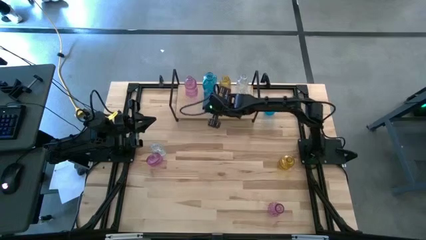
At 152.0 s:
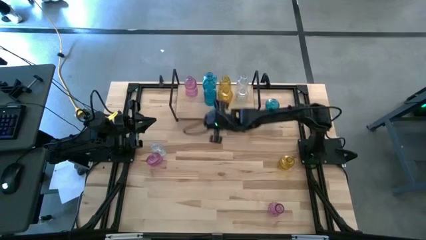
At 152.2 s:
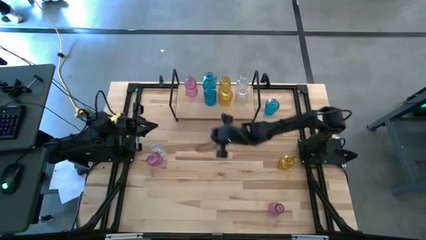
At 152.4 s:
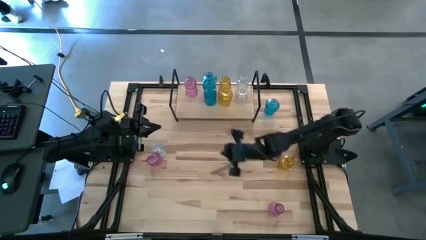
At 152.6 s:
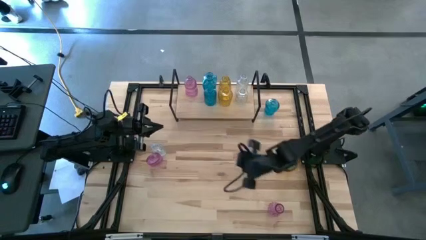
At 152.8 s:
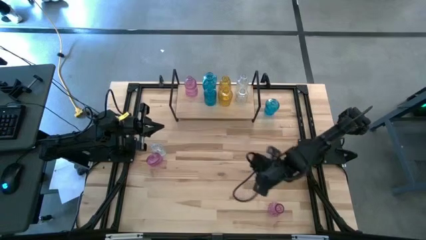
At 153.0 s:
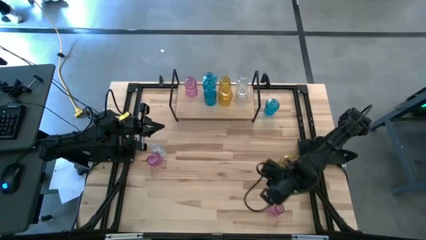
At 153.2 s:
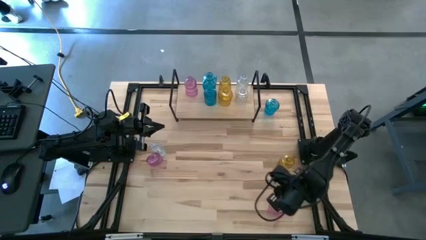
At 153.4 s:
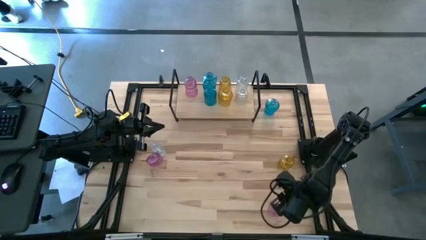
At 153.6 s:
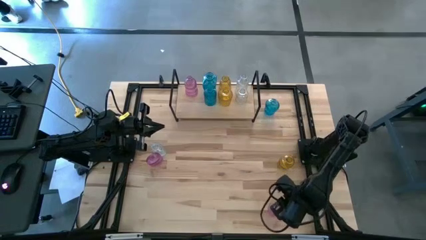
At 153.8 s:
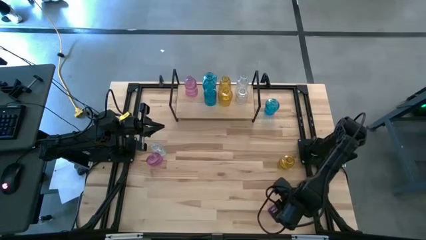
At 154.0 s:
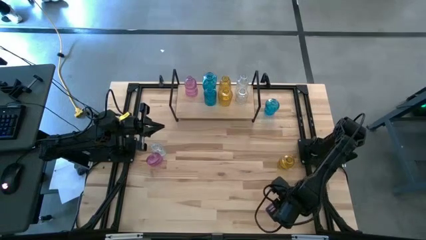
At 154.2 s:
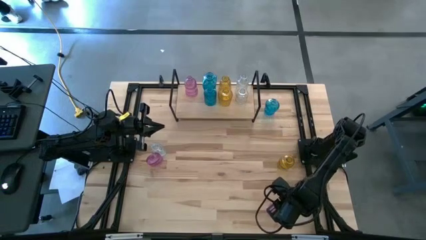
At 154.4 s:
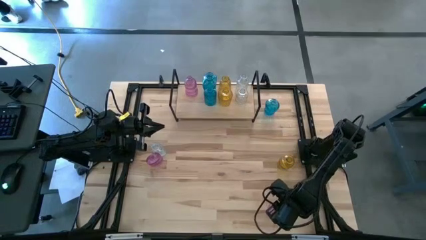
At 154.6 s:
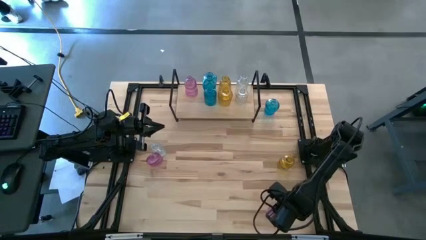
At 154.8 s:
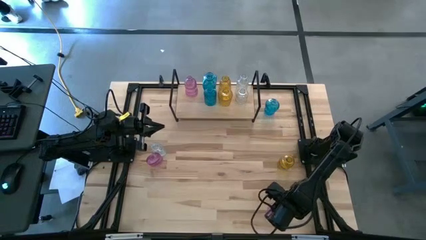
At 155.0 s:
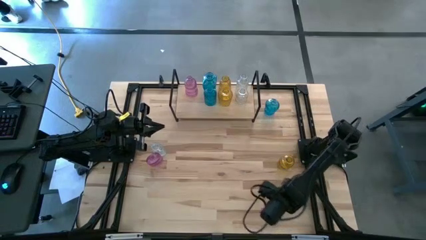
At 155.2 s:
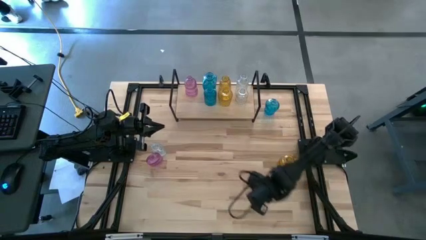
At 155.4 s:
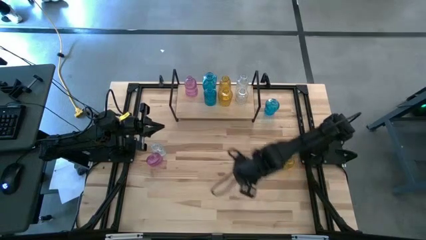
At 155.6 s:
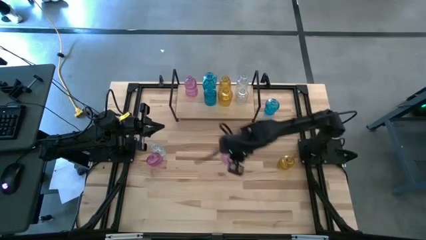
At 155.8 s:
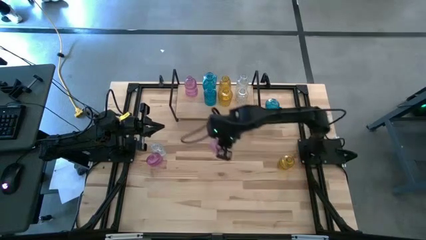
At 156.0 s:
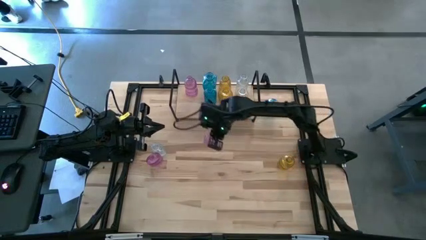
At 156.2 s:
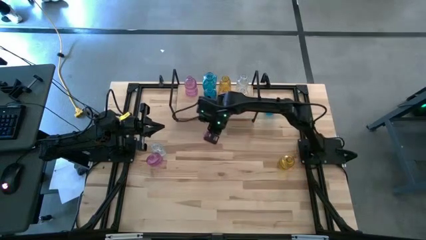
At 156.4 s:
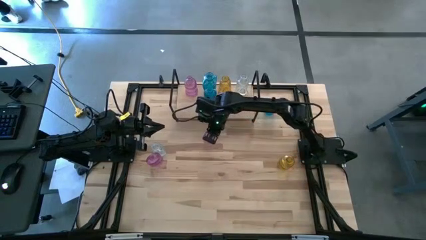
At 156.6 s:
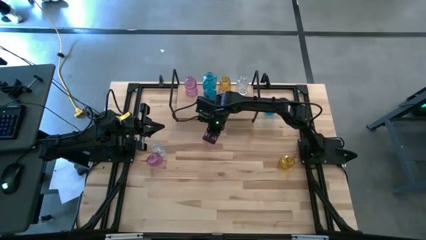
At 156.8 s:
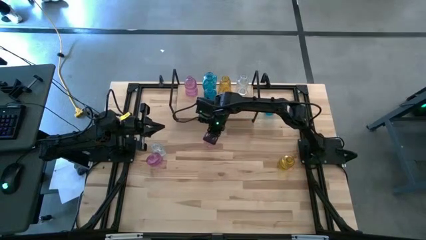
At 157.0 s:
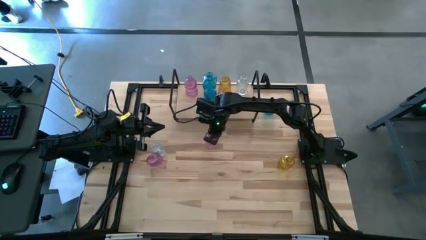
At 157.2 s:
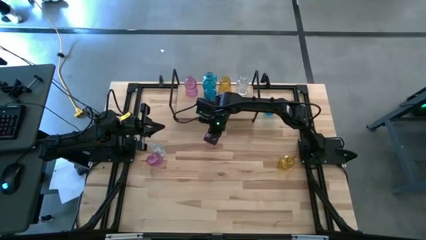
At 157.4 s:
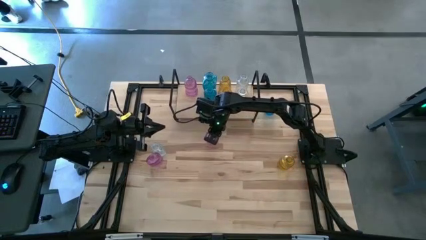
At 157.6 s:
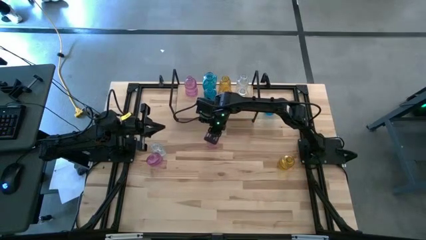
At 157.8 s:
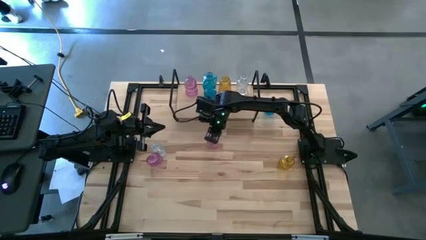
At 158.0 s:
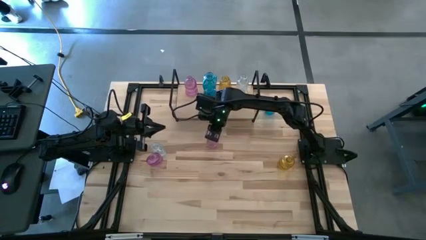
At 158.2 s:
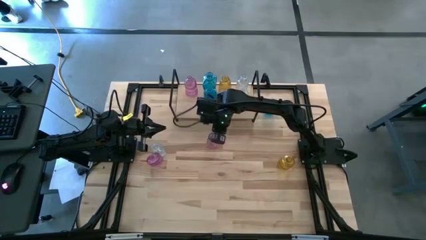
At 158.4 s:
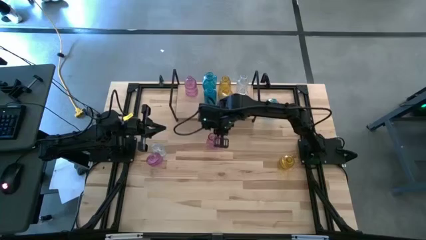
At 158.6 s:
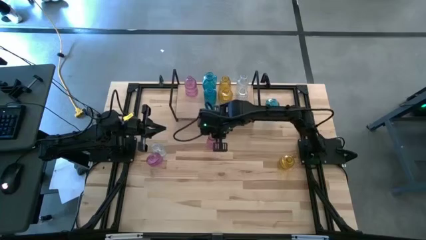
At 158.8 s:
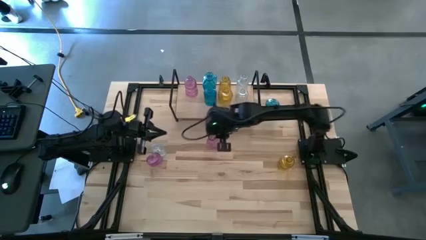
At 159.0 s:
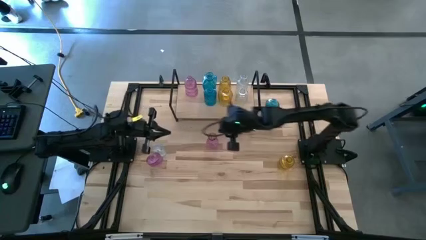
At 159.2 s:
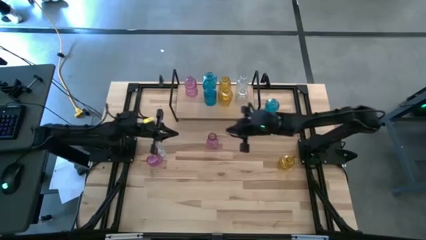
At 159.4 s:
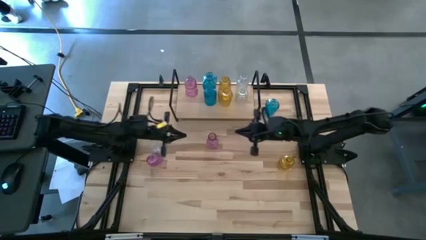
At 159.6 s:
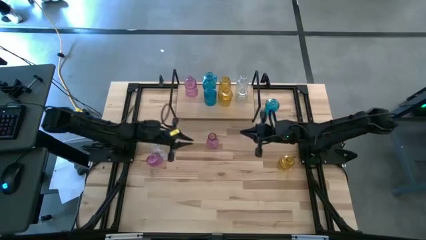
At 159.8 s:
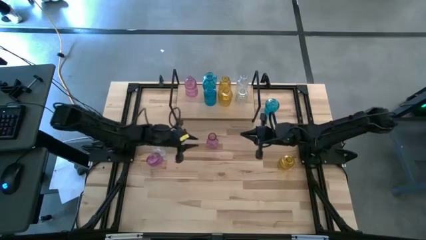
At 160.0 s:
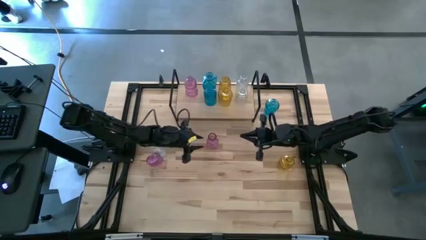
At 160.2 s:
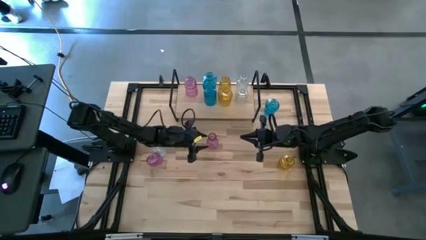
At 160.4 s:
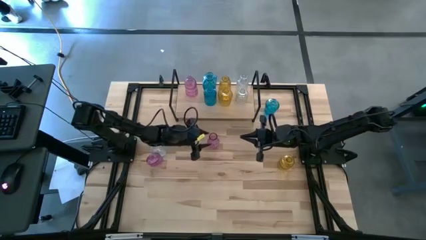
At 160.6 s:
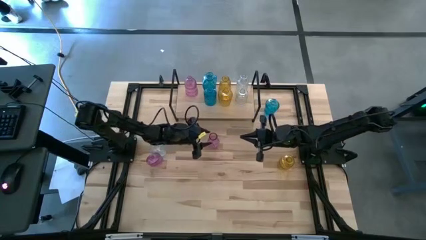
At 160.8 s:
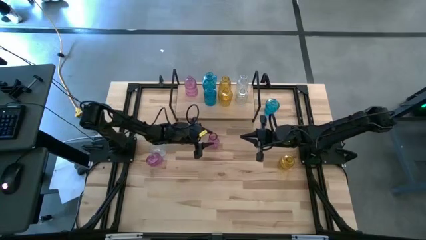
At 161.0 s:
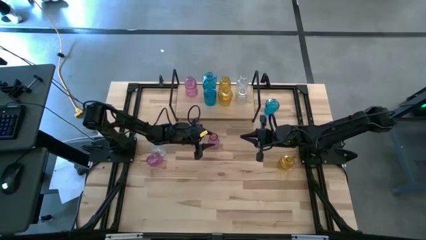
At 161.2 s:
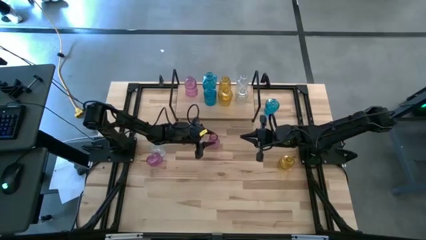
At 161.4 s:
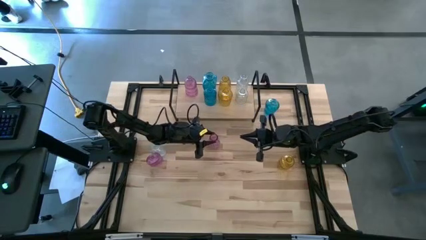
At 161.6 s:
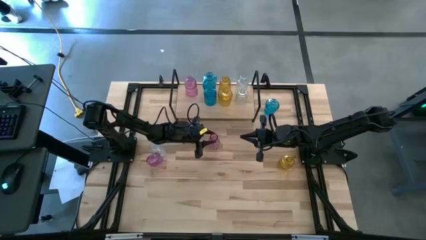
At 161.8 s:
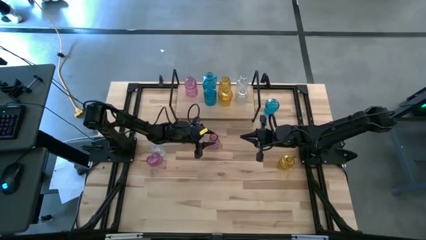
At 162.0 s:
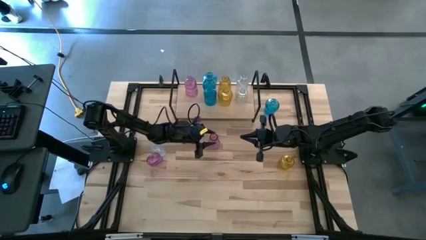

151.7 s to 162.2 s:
Task: sort vases onto shelf
Put the bottom pink vase on the shelf aligned with the pink vase

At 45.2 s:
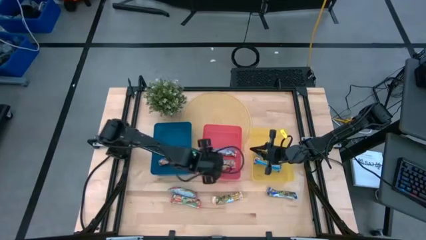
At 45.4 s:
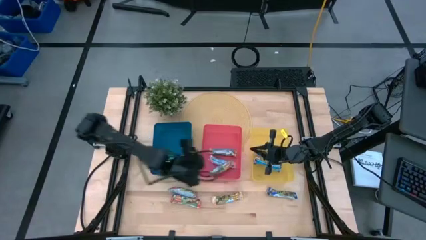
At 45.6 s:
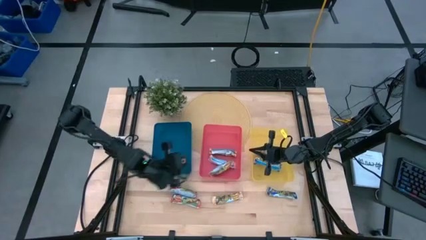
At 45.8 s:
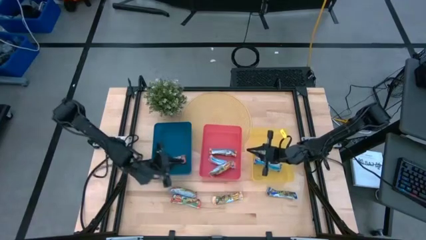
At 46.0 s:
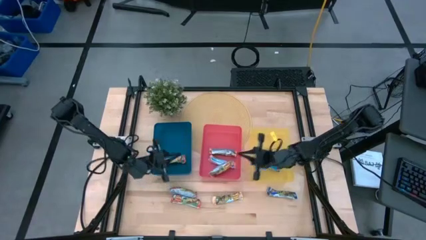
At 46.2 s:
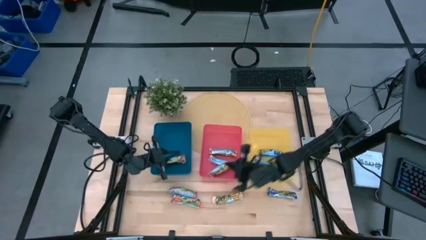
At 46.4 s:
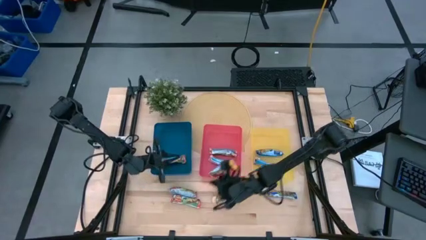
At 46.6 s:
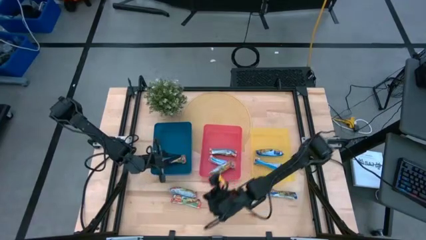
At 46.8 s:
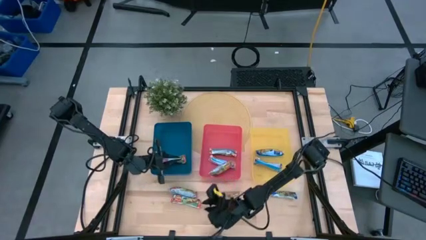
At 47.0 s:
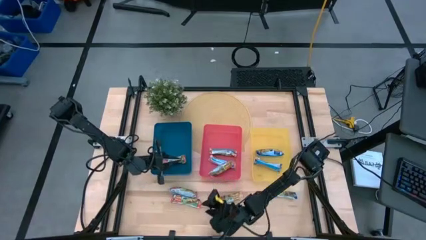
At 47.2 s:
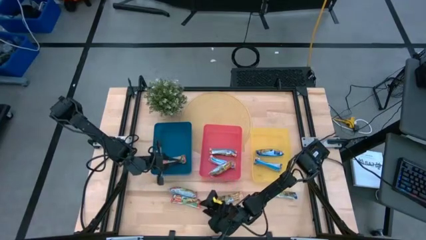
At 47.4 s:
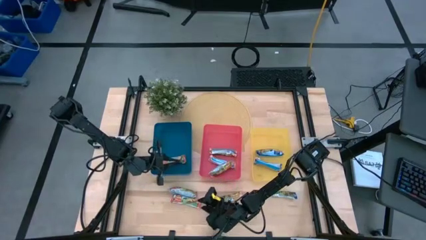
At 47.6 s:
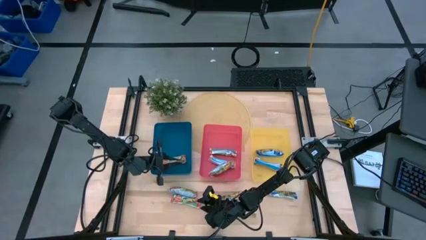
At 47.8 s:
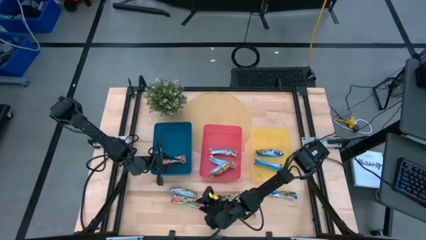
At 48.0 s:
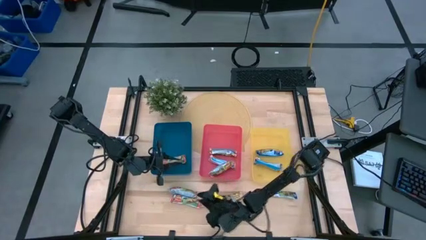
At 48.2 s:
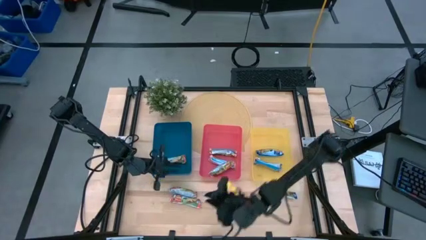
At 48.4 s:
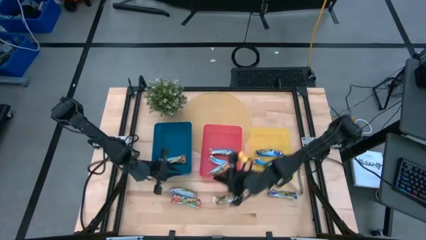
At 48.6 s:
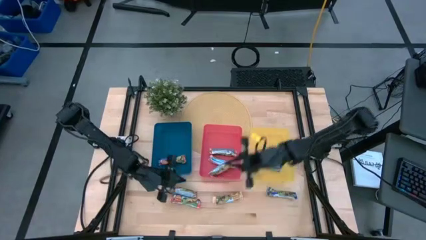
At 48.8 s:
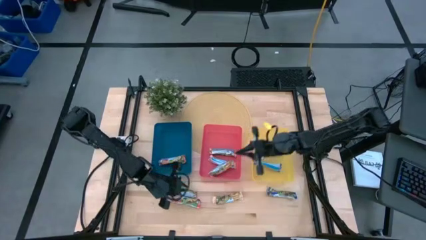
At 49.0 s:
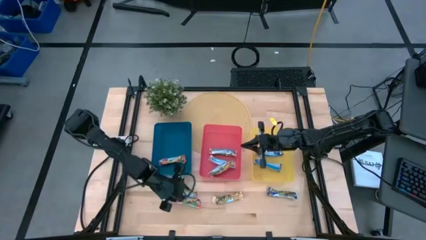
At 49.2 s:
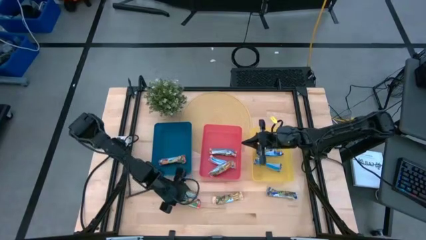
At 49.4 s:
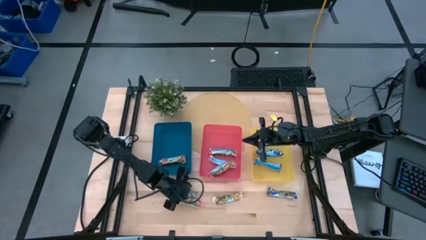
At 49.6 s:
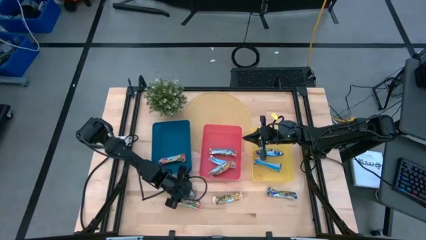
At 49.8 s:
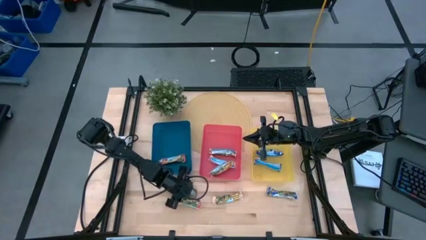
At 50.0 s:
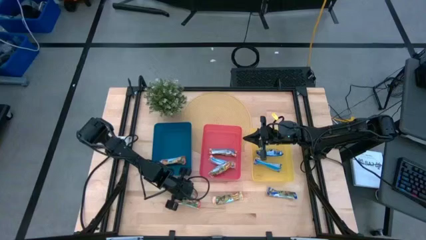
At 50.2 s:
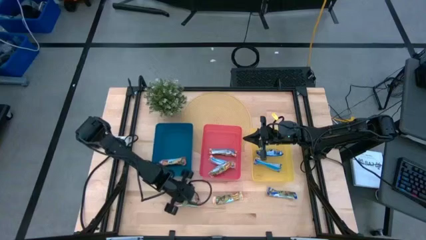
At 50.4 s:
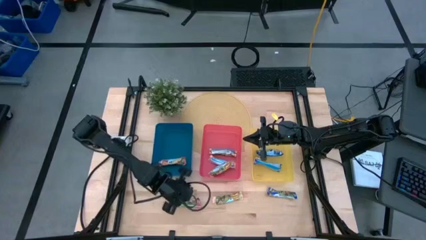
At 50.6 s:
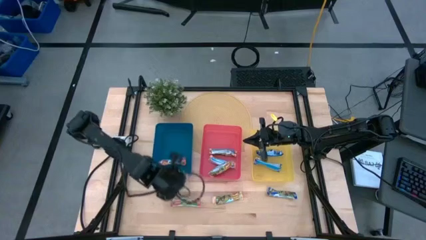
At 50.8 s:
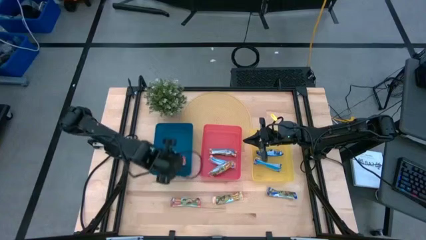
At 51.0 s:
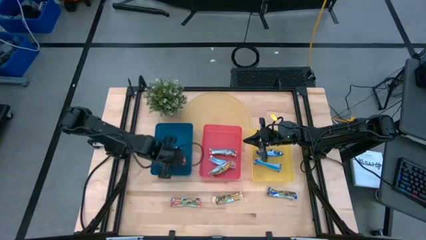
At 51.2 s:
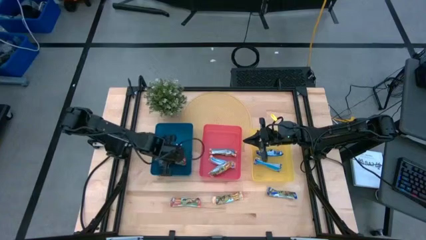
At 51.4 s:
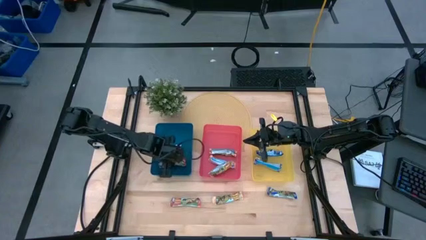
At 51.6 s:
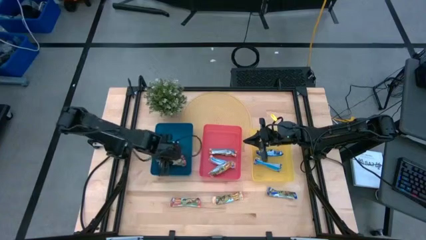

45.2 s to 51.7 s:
Task: Pick and place Granola Bars by type
Put the red granola bar into the blue bin
